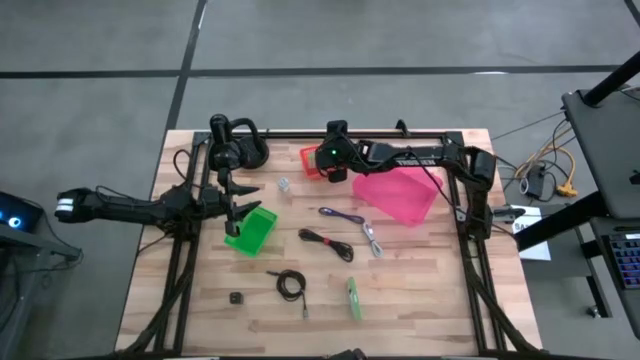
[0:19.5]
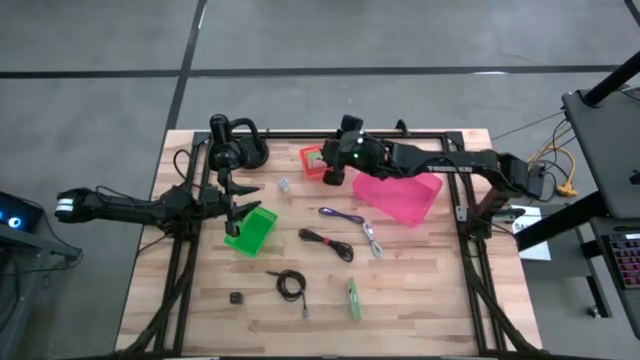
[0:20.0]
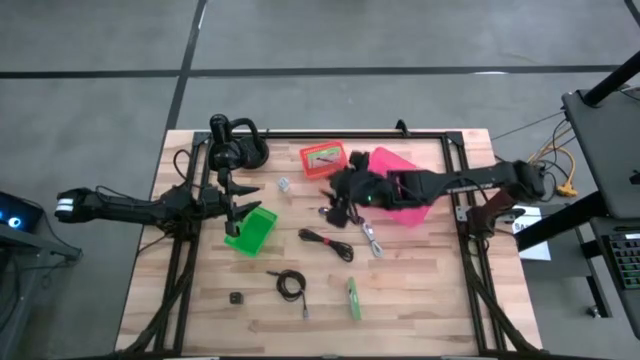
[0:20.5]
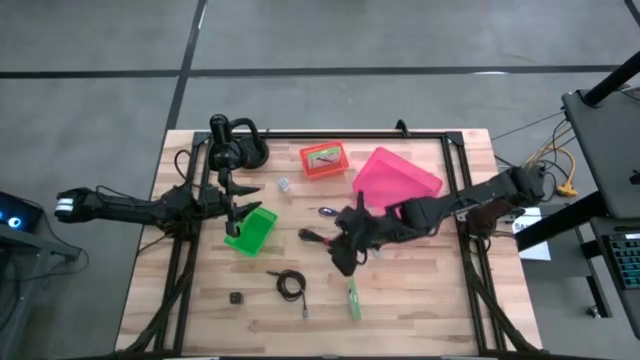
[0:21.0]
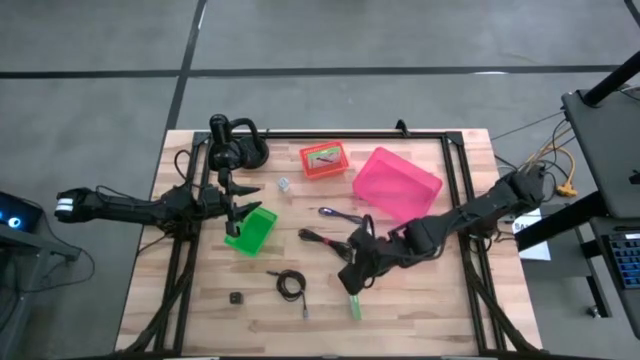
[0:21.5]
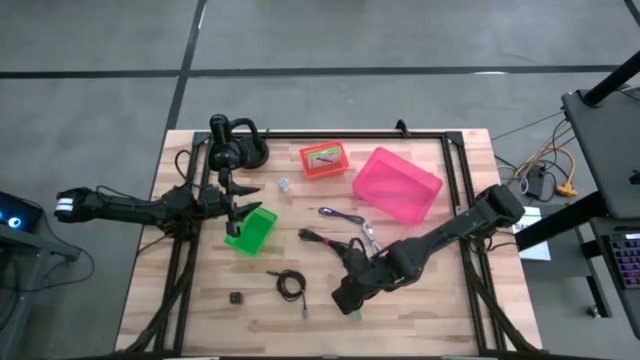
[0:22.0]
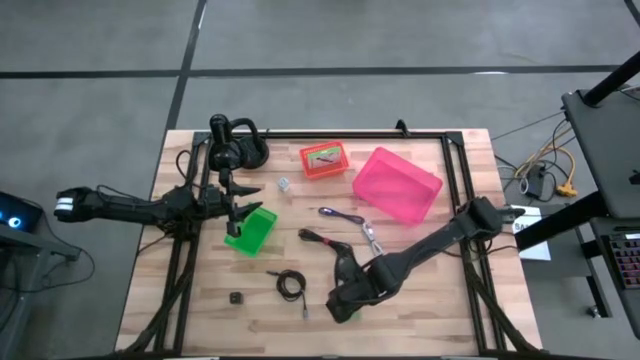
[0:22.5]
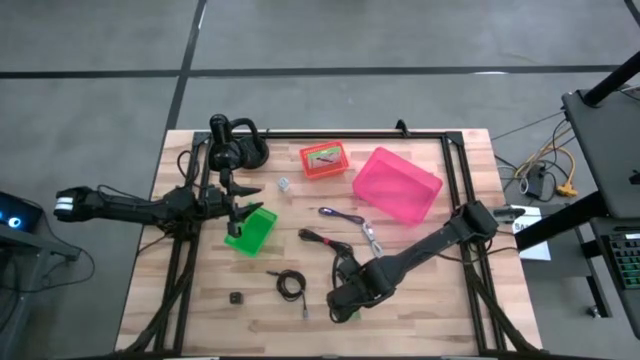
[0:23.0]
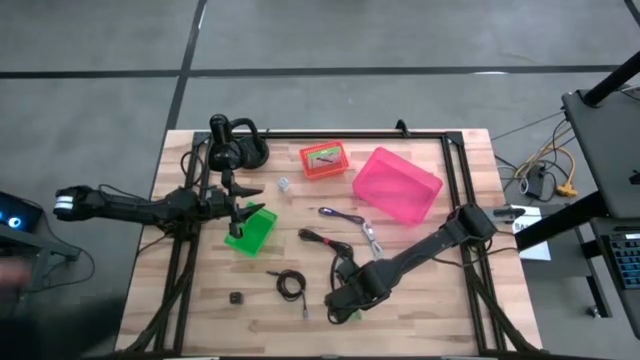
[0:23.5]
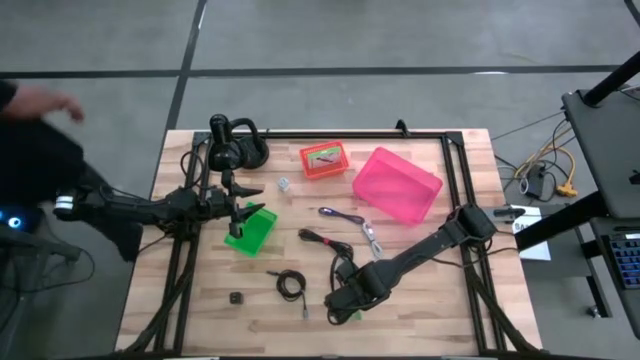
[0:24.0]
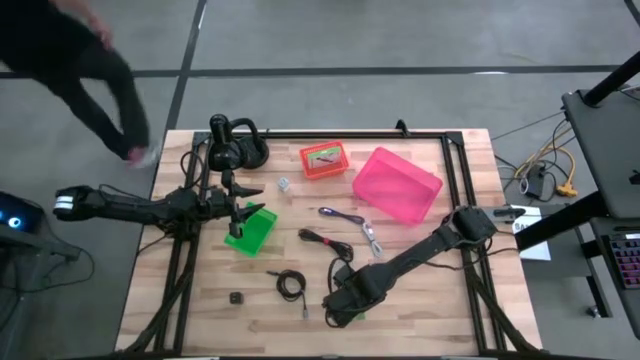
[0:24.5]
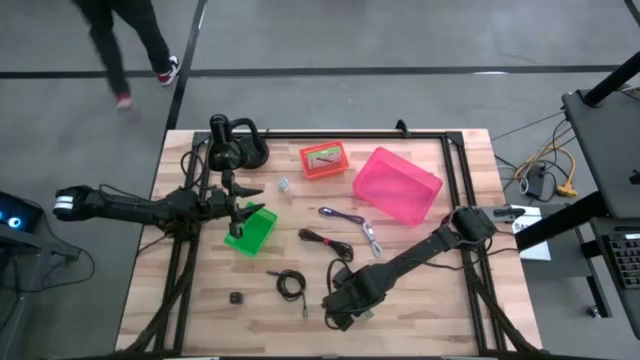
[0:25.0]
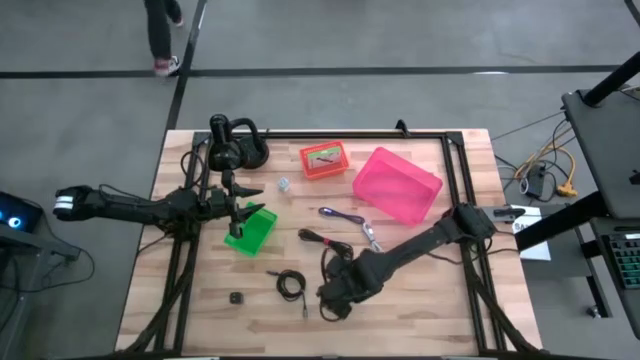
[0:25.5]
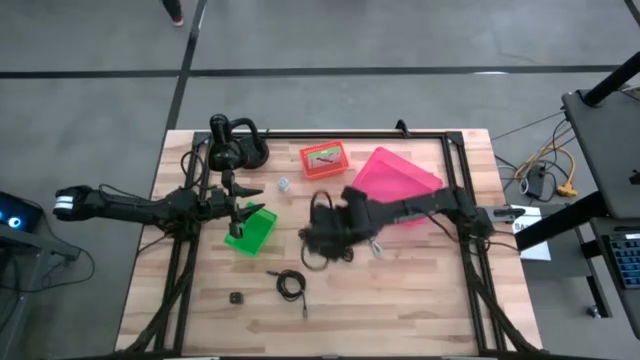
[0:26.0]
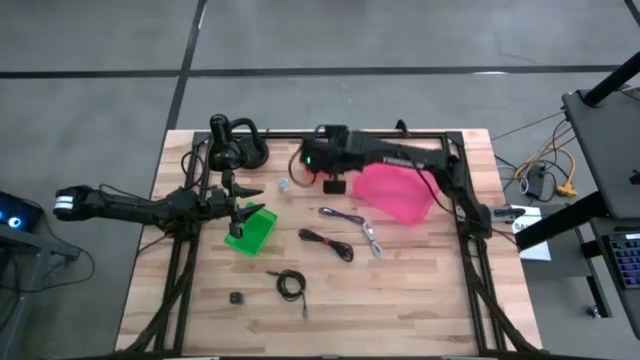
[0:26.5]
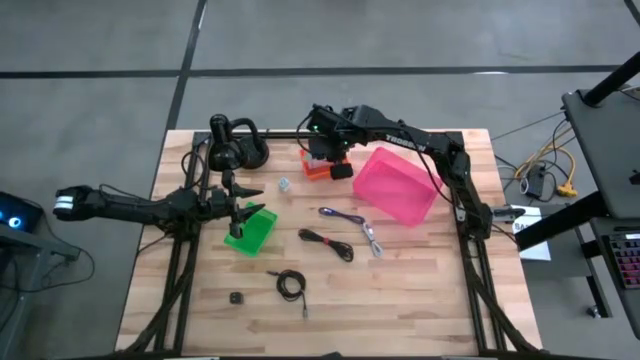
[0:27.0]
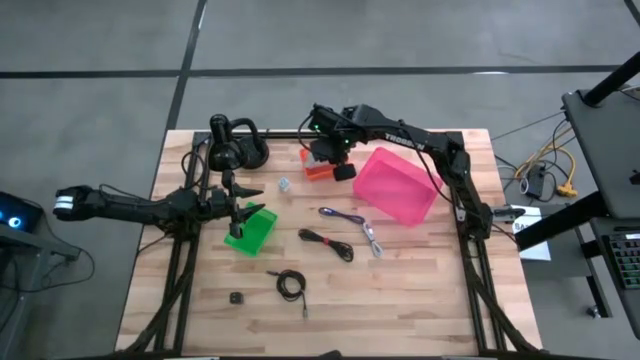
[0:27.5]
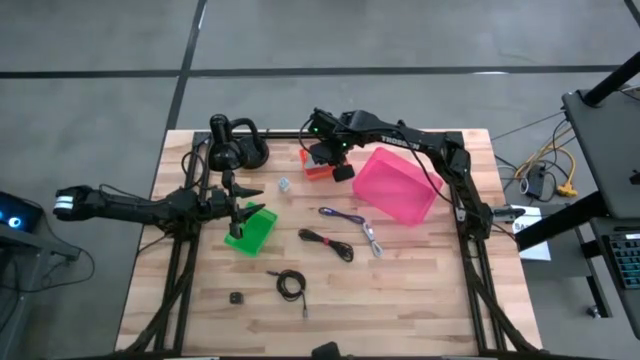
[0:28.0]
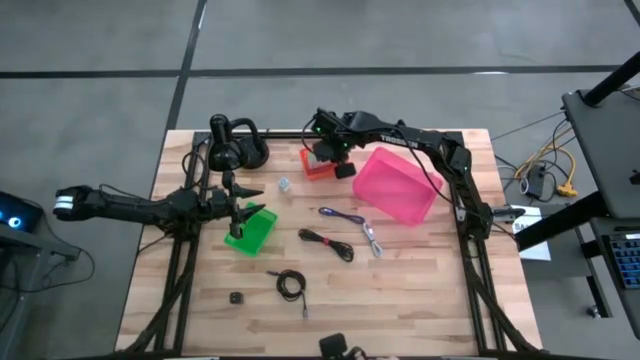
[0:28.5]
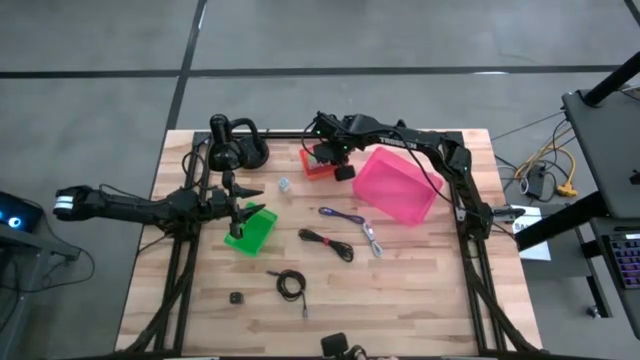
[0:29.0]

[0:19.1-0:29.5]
Task: Pick and place items into bin
Put the white card reader box into the orange basket

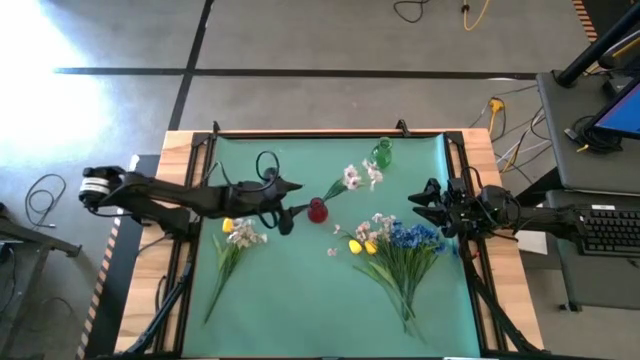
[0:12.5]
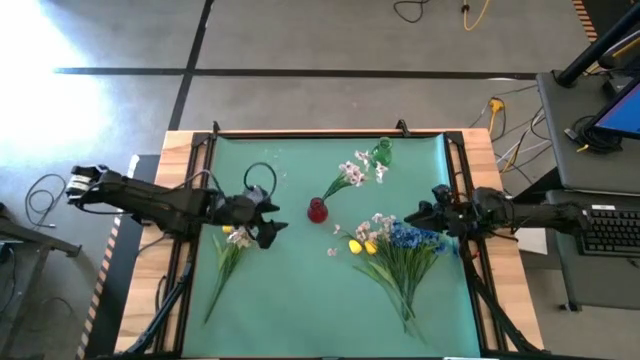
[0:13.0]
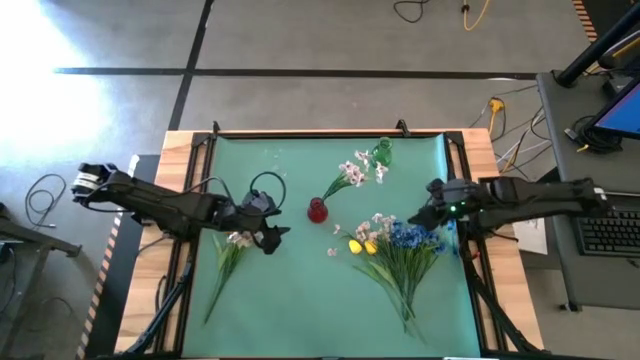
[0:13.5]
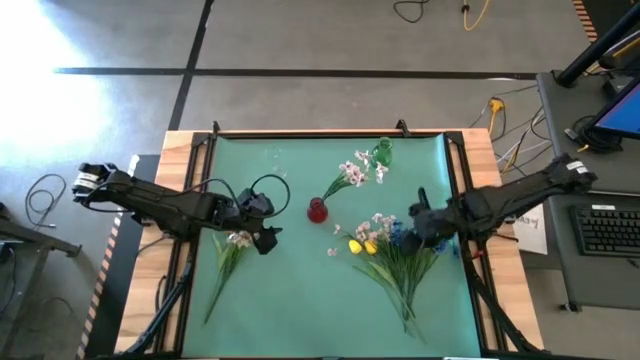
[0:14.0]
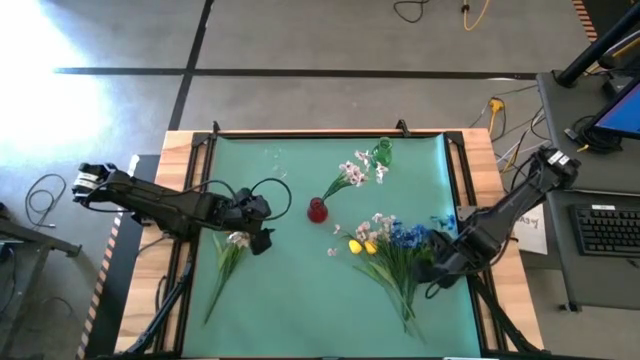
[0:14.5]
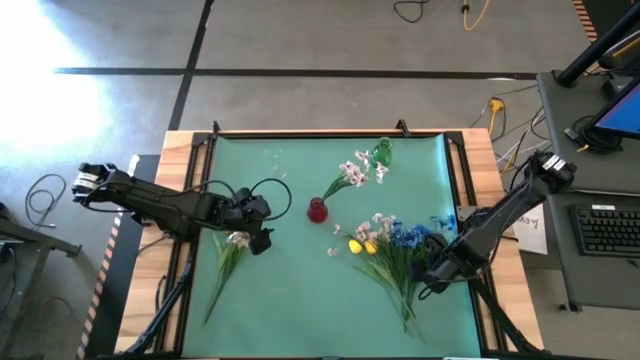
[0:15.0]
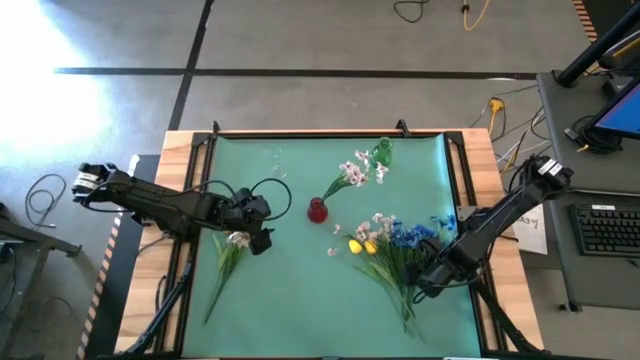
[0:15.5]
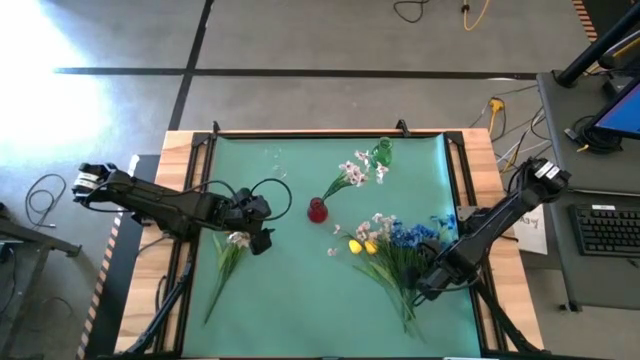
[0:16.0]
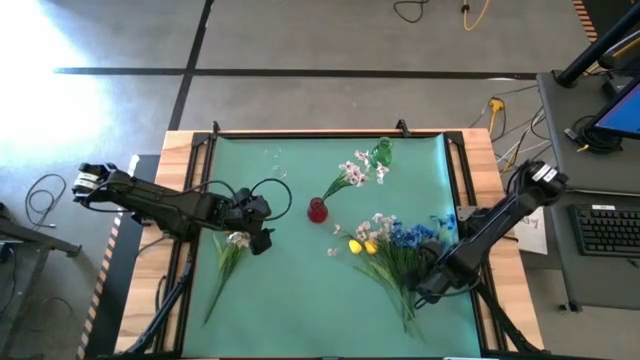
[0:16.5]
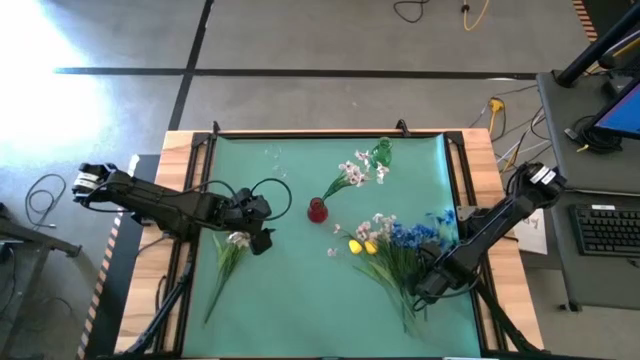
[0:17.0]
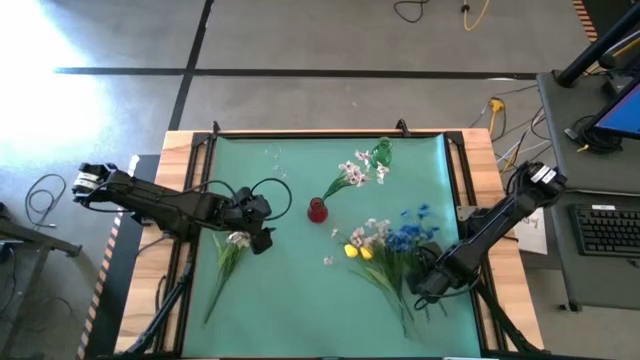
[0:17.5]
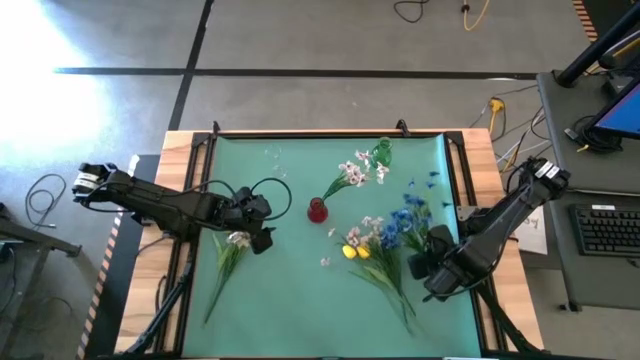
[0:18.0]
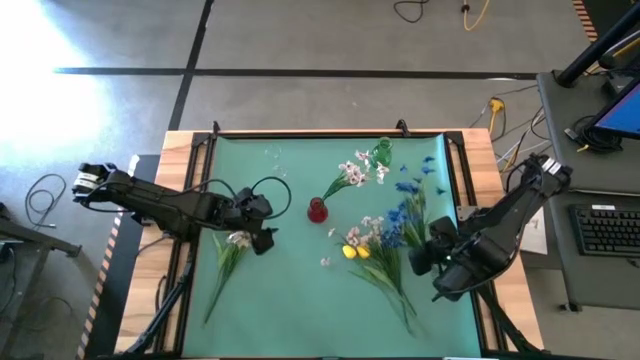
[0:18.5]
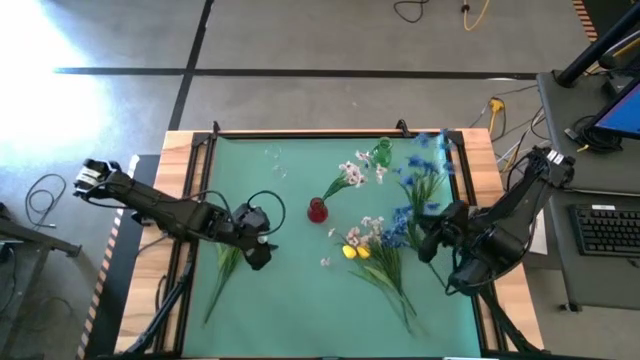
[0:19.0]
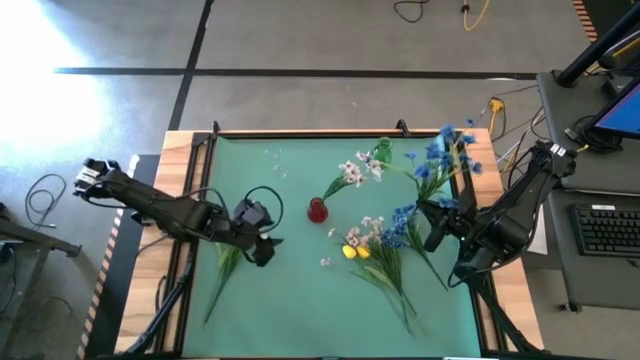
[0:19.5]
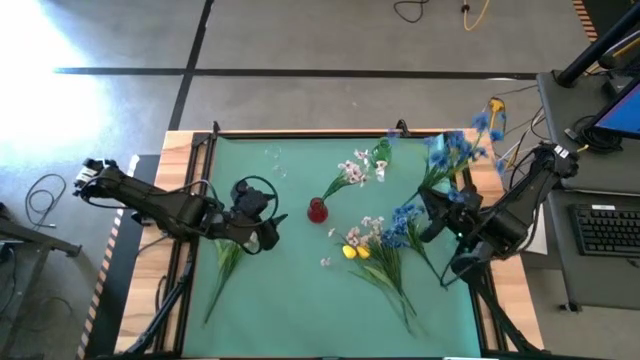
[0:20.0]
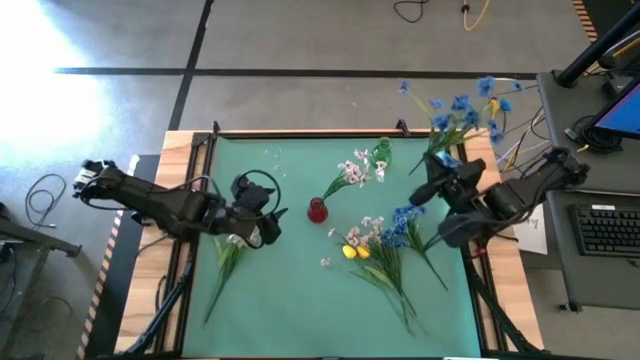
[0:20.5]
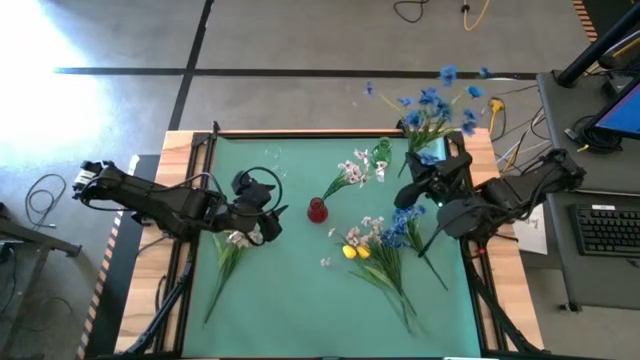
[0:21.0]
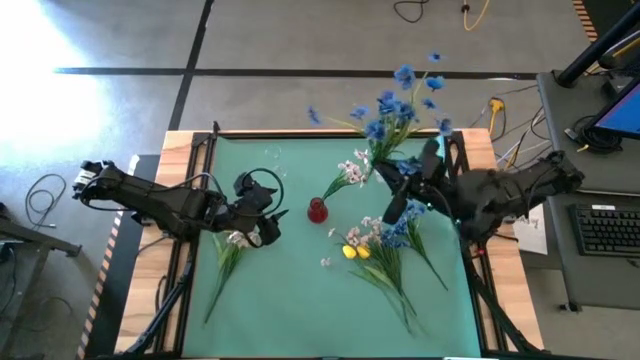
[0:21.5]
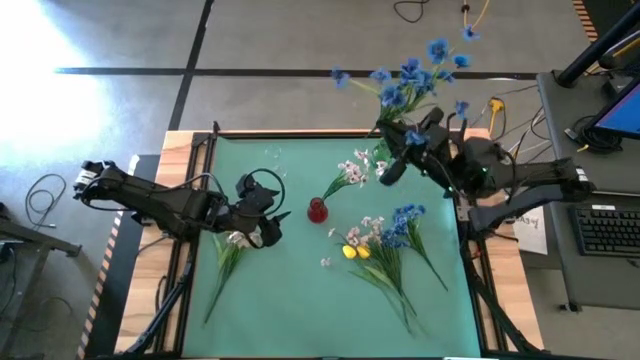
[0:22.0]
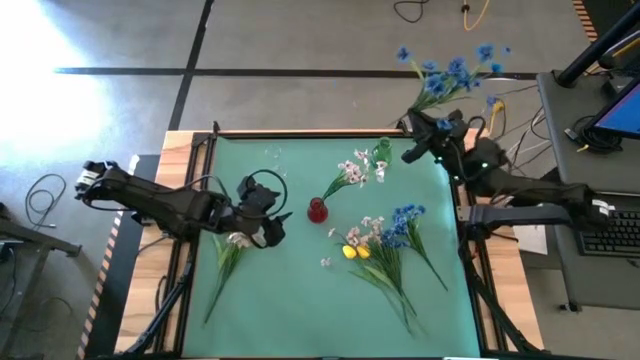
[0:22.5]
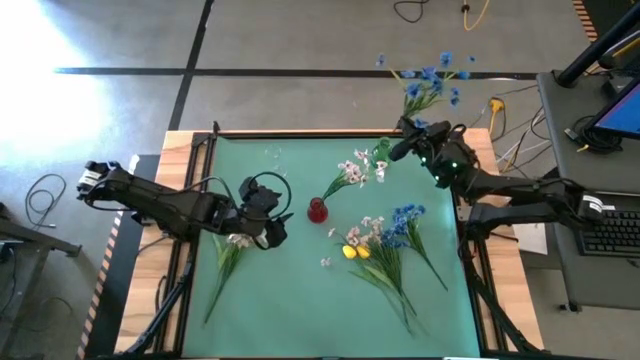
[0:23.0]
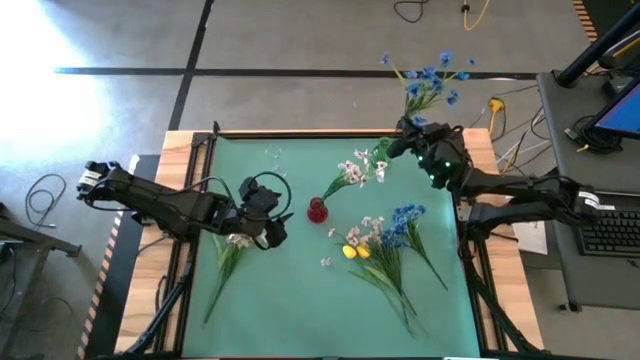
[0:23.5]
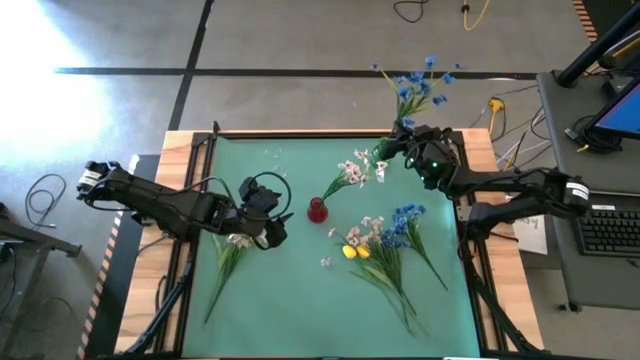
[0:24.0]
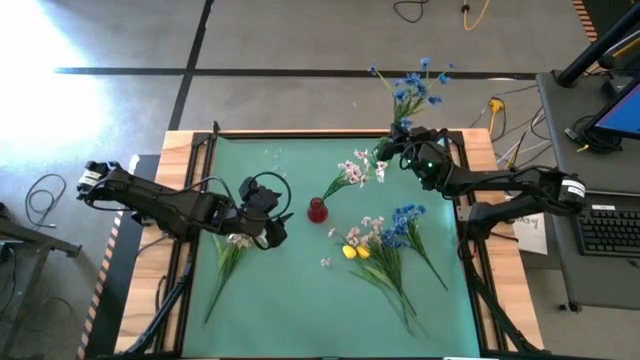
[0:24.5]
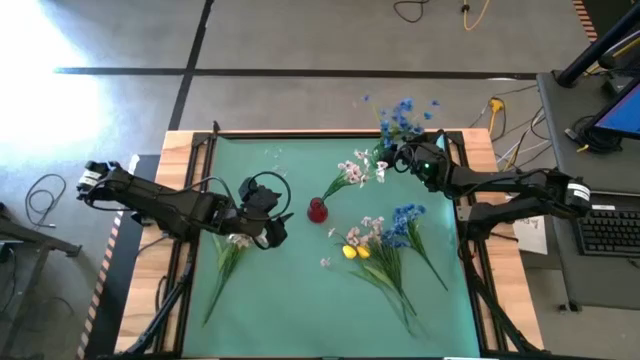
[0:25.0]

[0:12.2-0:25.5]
Task: Sort flowers into vase by color
Put the blue flowers into the green vase
